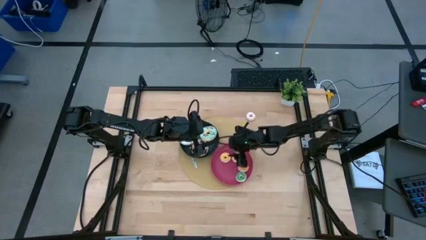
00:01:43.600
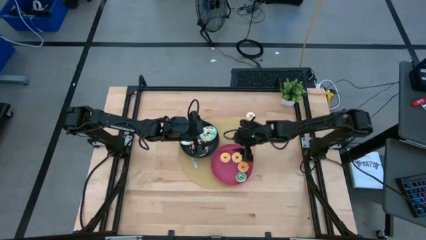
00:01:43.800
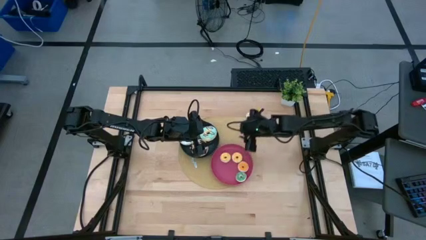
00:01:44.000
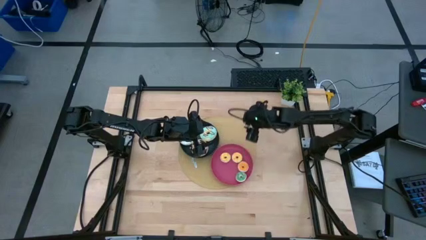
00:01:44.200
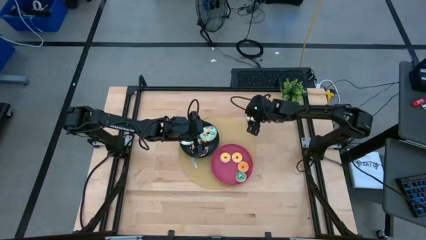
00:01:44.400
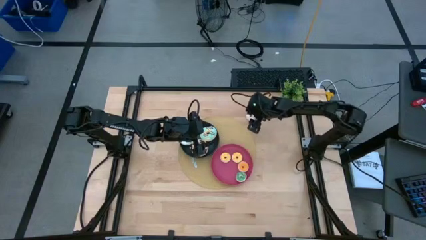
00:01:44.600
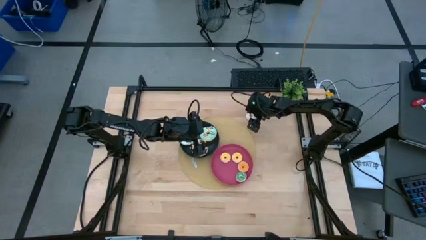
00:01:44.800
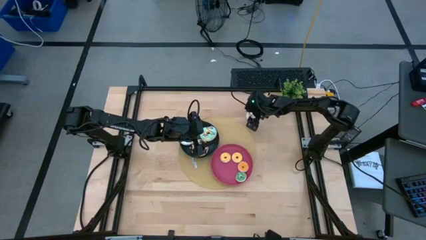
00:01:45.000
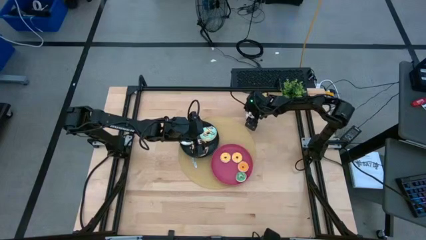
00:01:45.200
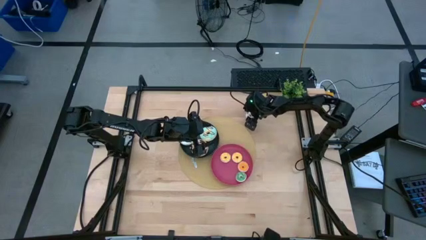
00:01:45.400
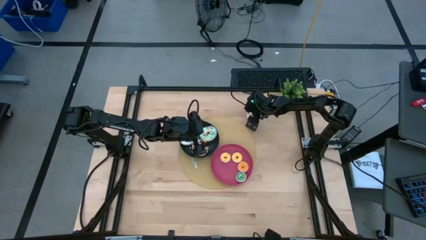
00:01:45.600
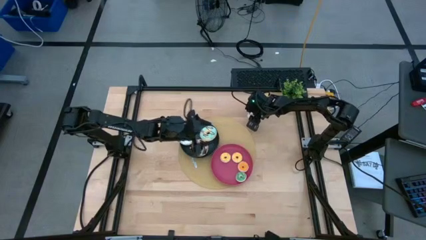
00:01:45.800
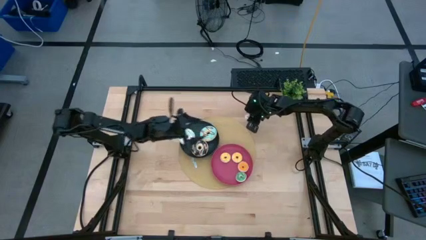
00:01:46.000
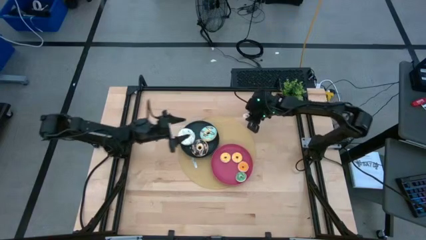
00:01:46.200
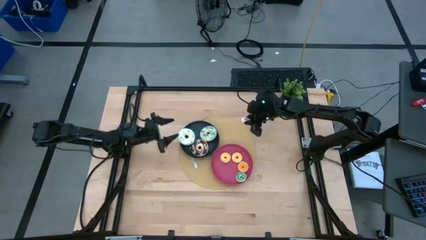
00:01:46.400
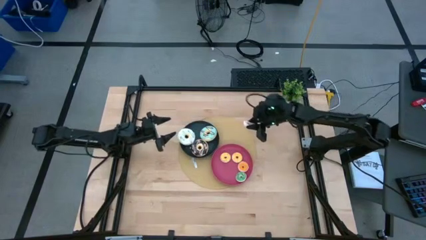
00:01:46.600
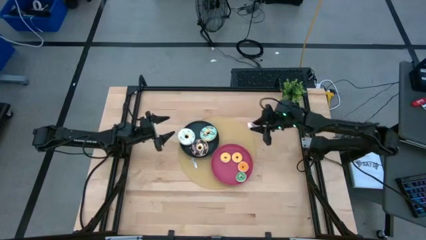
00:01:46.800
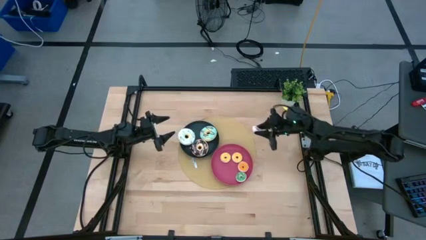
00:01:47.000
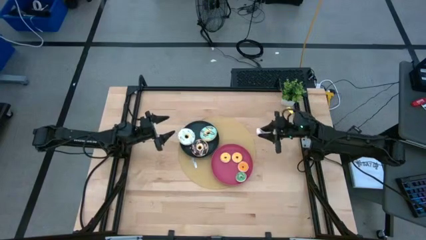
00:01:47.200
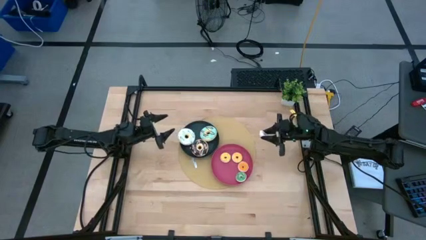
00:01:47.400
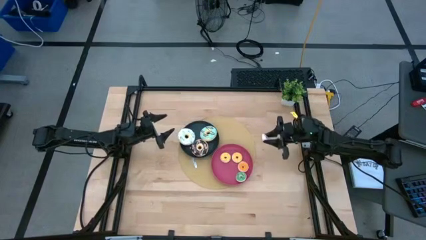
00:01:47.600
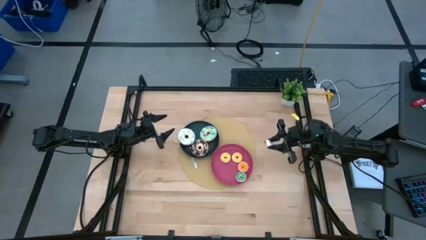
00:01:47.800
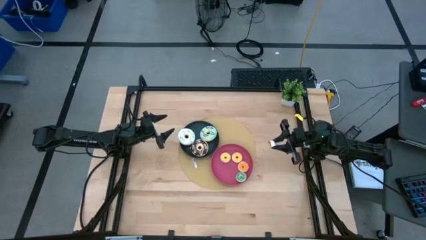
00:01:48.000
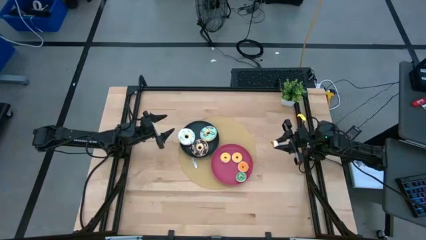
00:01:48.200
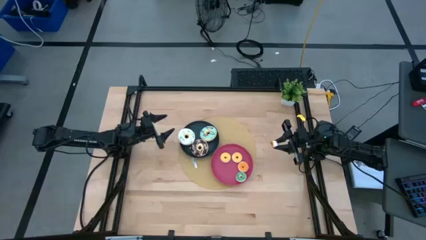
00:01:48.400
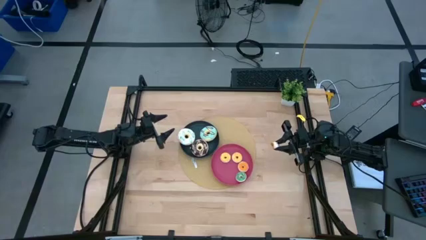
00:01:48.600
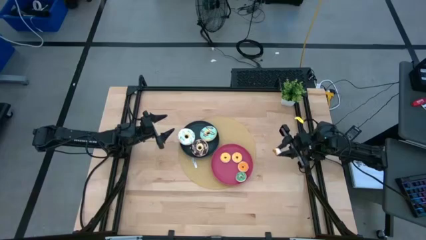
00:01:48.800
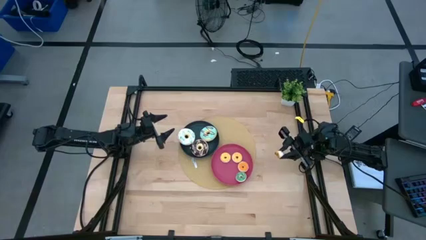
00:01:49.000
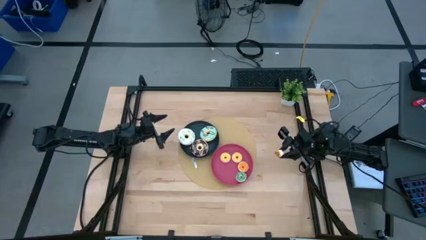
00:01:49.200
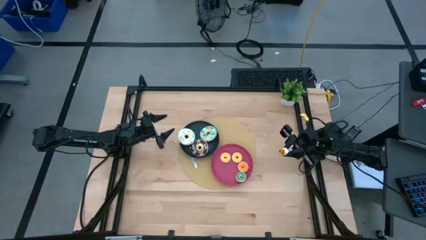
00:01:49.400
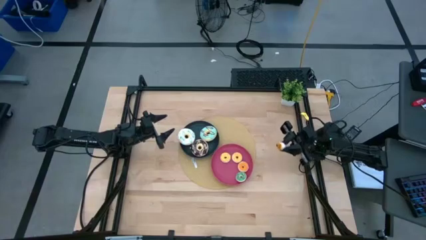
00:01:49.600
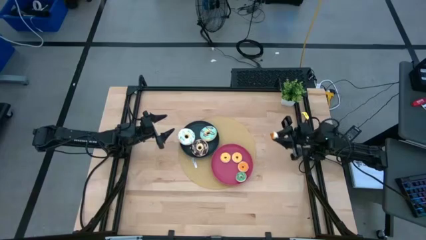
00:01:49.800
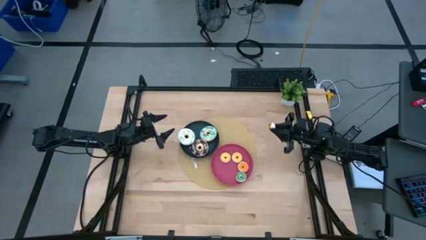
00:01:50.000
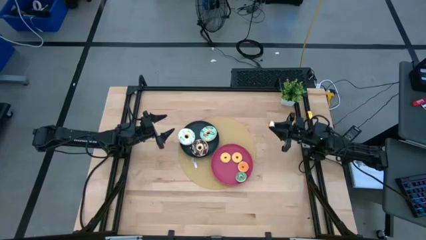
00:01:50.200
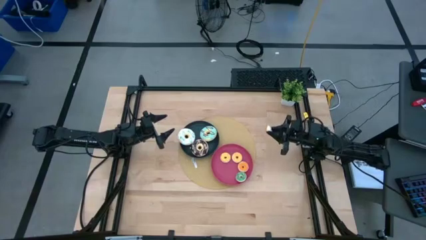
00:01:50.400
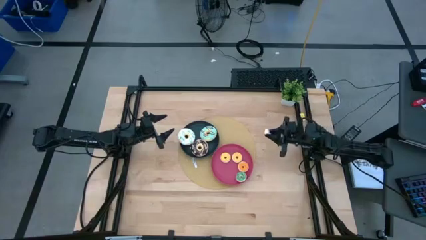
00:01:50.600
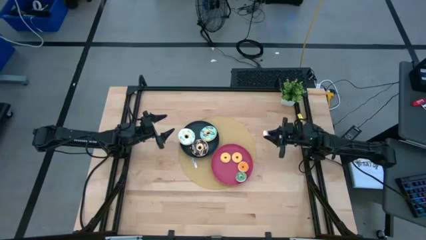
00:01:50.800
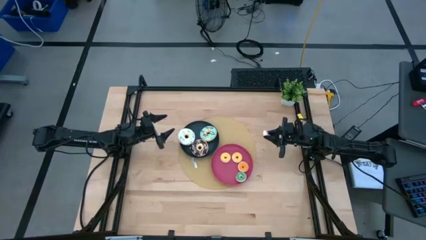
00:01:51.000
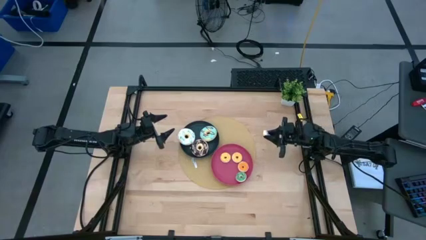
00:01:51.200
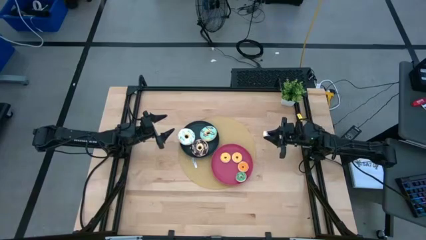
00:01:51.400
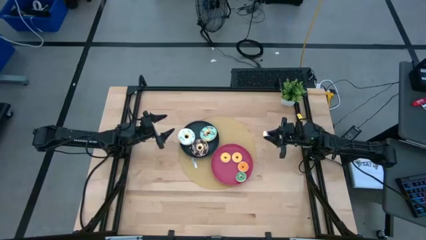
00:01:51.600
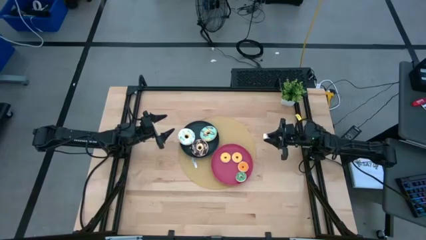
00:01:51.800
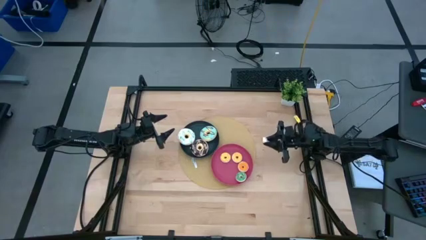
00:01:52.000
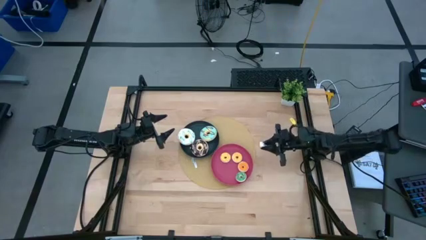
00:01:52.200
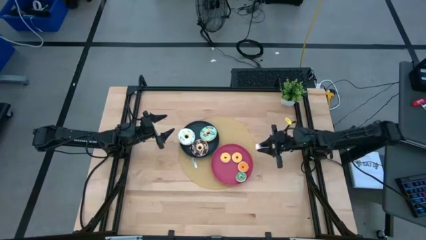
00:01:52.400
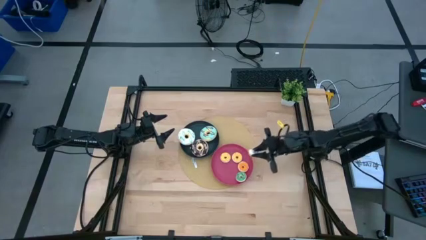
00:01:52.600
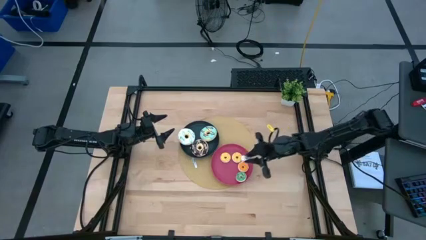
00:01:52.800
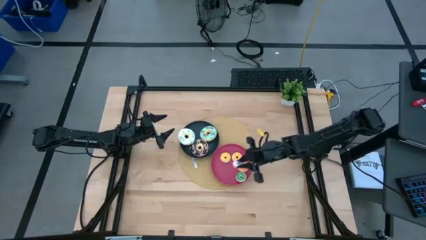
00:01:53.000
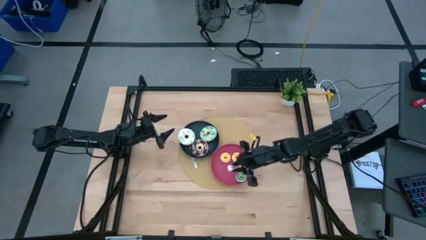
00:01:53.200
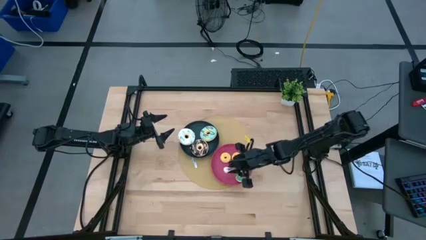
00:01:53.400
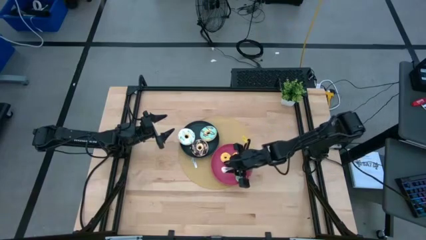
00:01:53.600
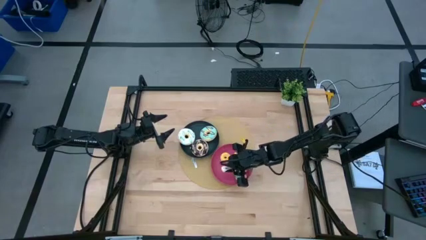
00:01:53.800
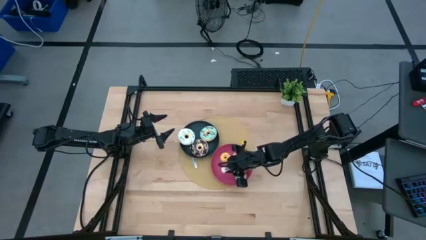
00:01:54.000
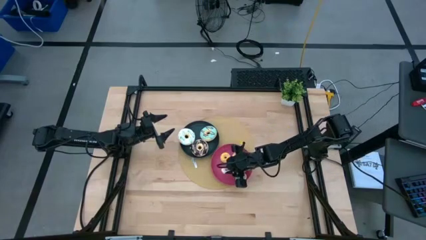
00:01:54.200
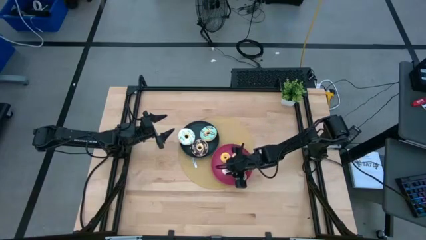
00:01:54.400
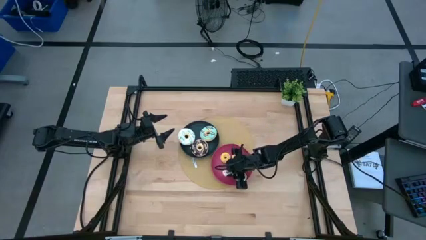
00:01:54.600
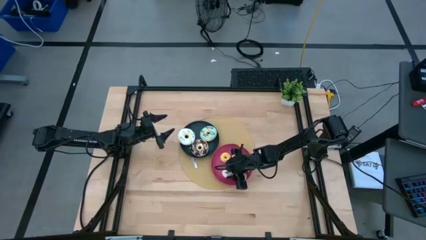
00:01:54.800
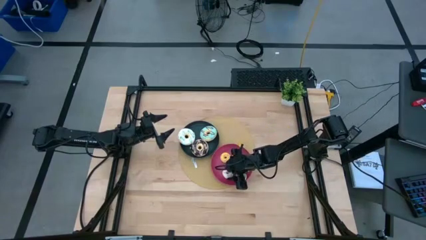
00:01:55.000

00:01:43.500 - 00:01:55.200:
Task: Pick & Place donuts
Put the small white donut on the pink plate
